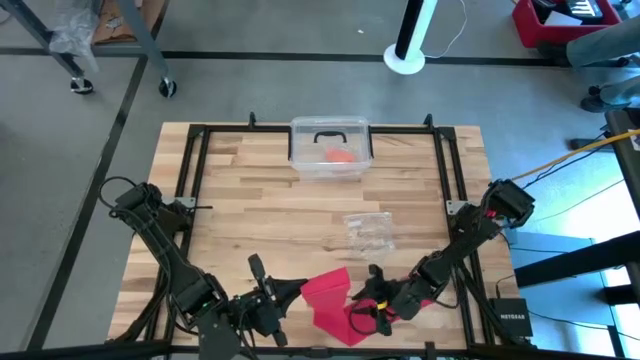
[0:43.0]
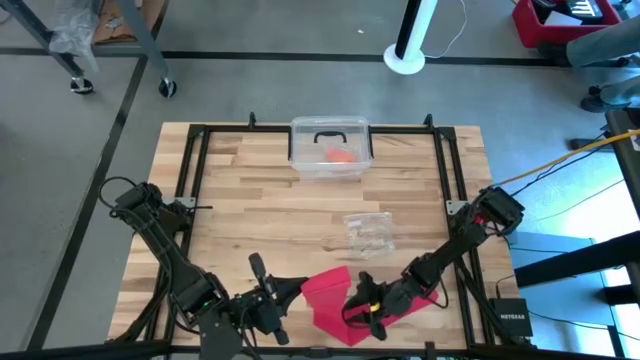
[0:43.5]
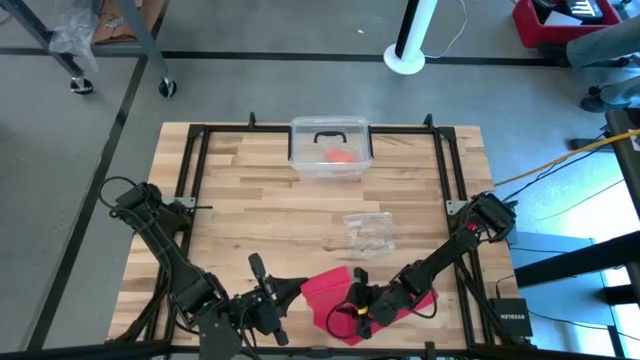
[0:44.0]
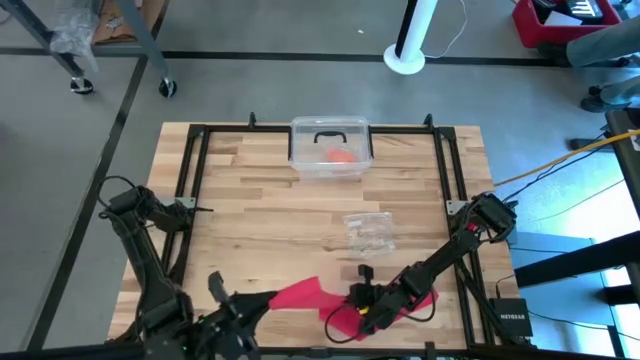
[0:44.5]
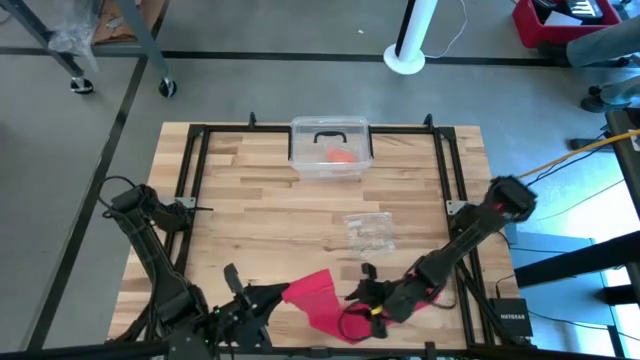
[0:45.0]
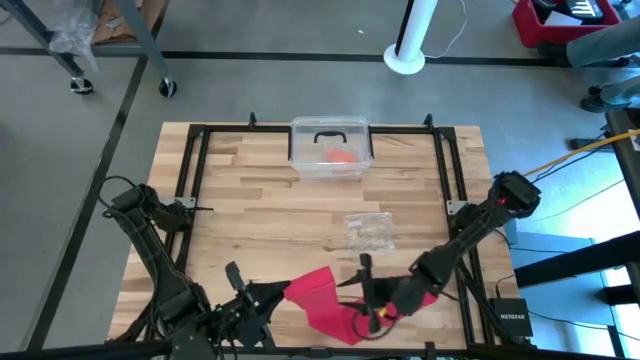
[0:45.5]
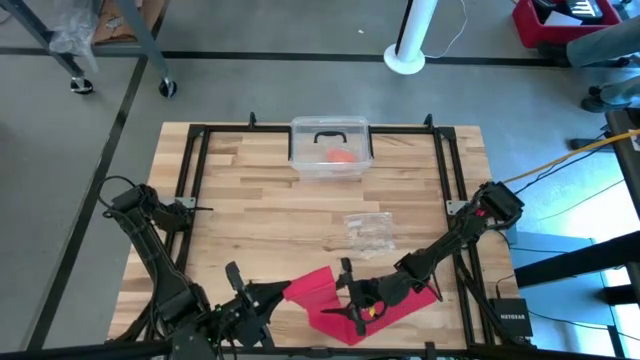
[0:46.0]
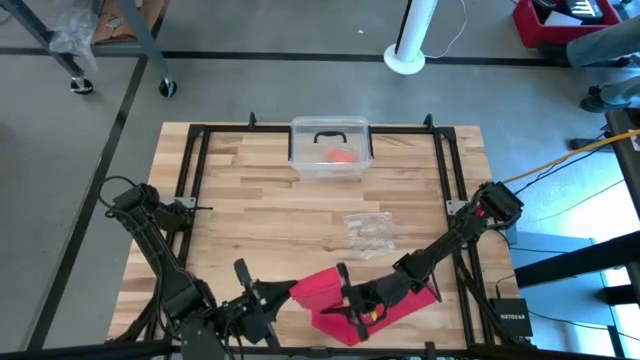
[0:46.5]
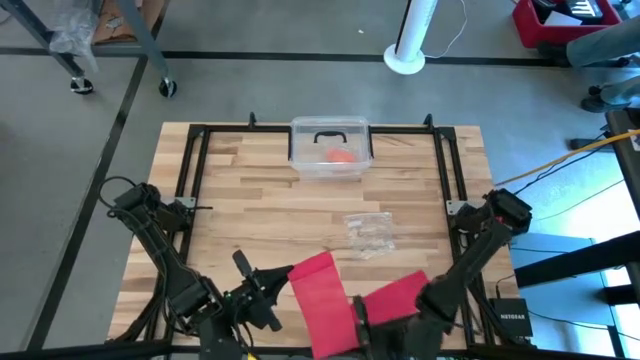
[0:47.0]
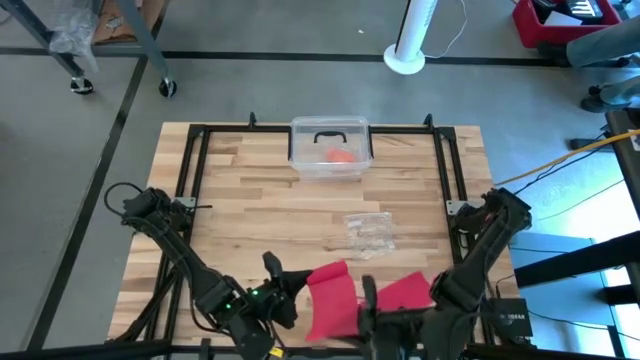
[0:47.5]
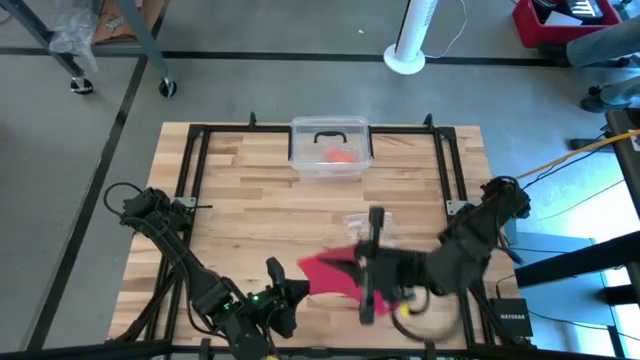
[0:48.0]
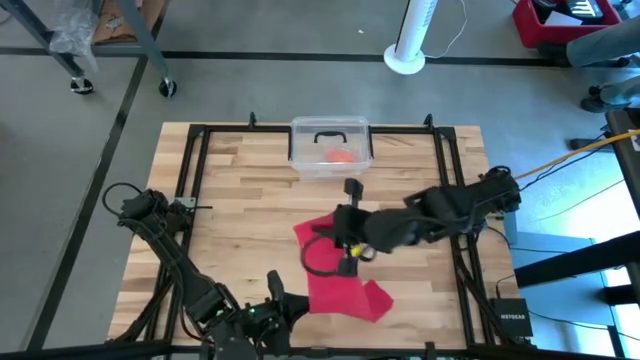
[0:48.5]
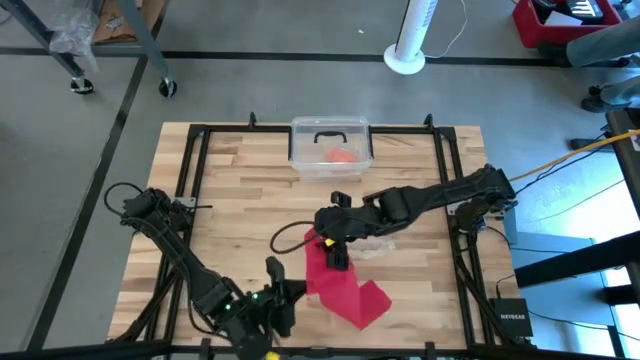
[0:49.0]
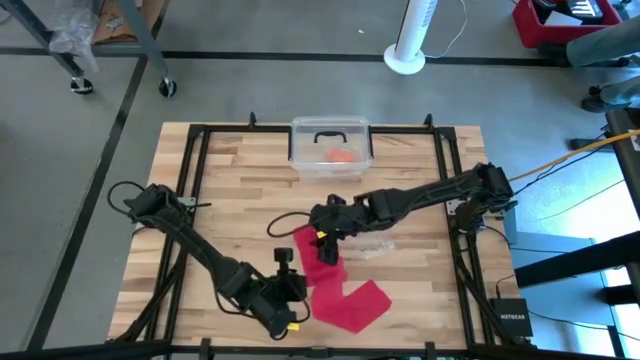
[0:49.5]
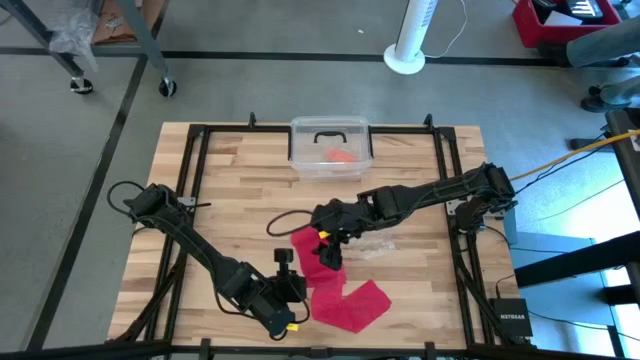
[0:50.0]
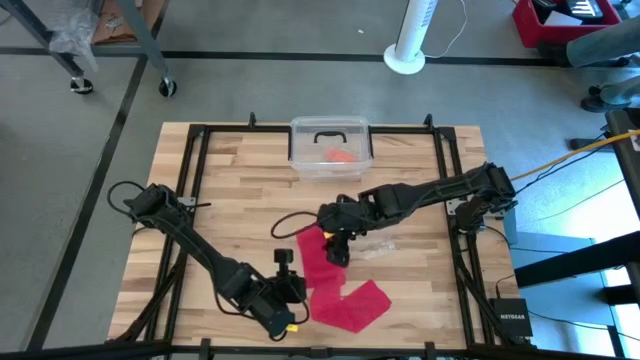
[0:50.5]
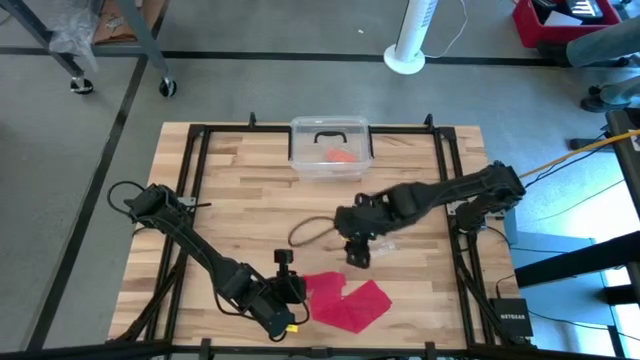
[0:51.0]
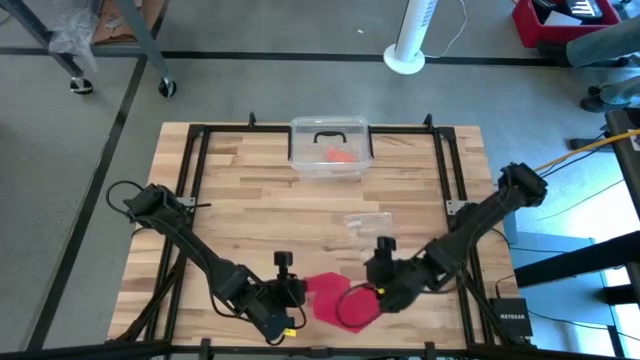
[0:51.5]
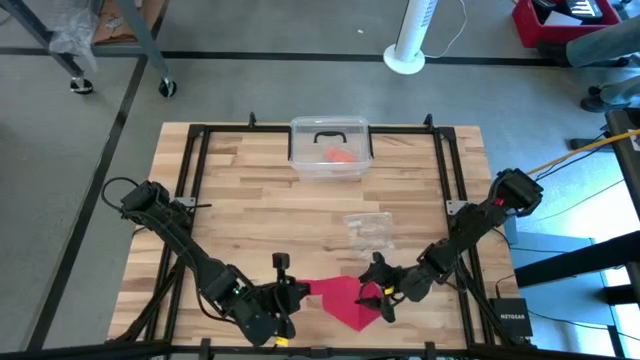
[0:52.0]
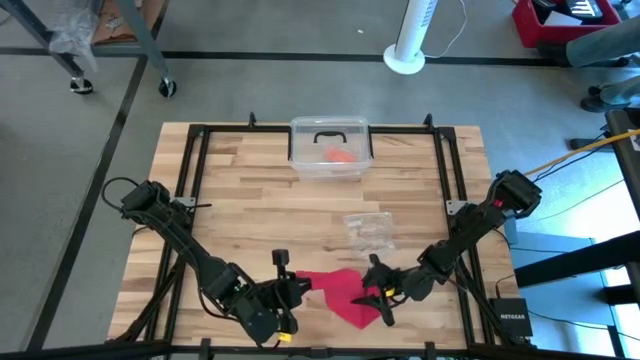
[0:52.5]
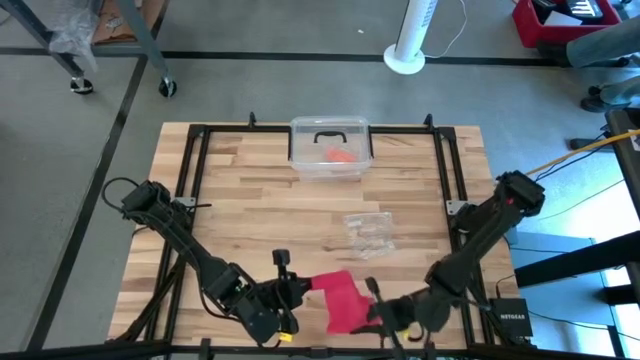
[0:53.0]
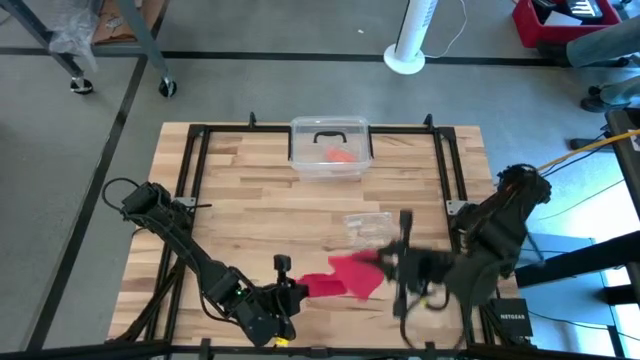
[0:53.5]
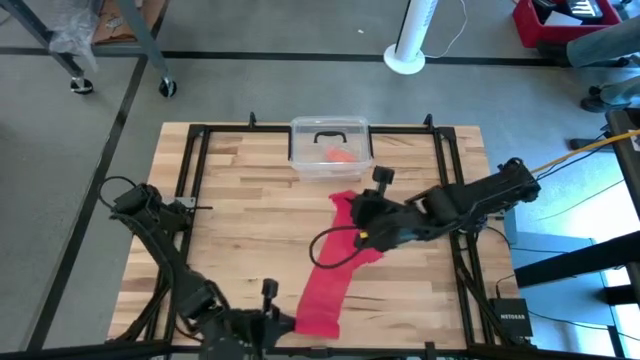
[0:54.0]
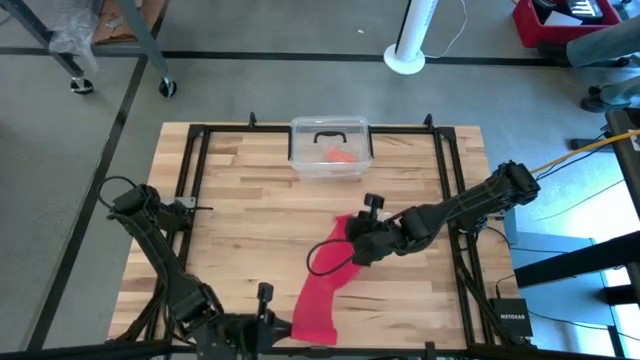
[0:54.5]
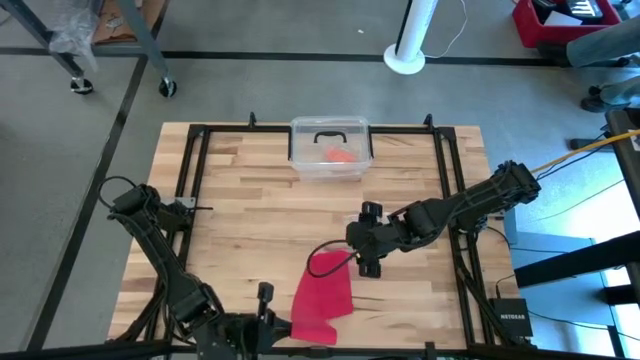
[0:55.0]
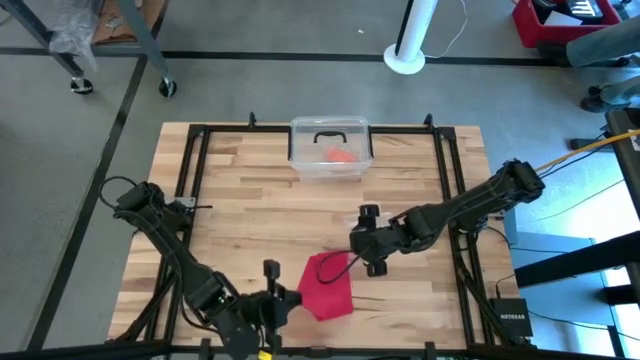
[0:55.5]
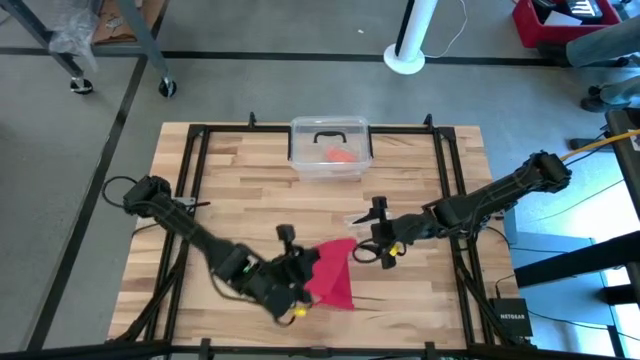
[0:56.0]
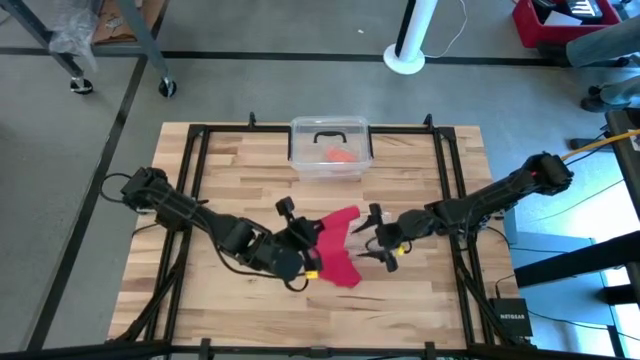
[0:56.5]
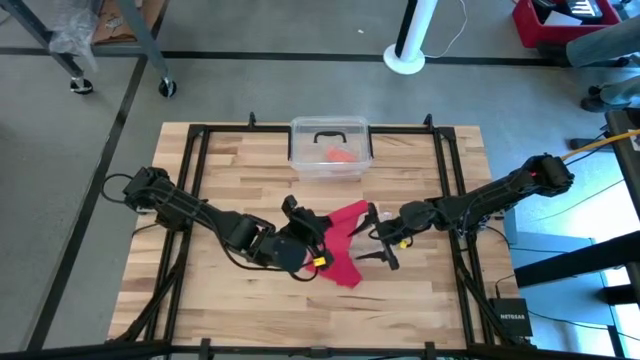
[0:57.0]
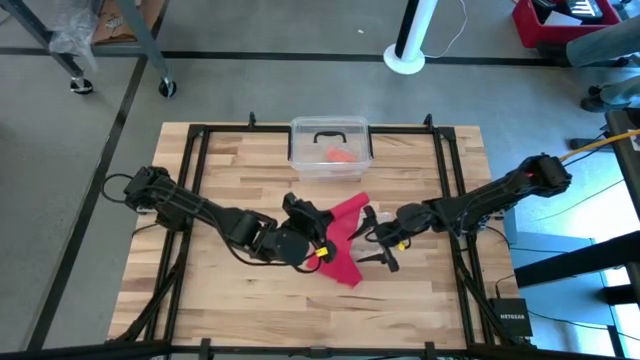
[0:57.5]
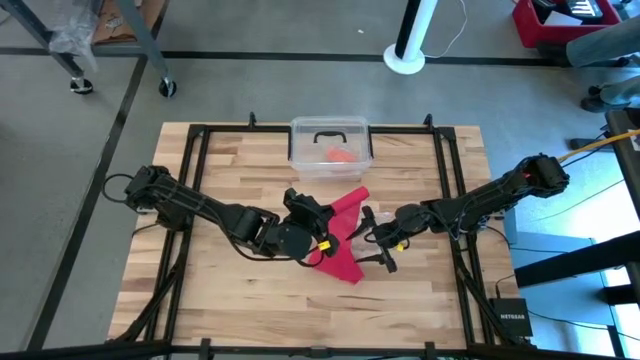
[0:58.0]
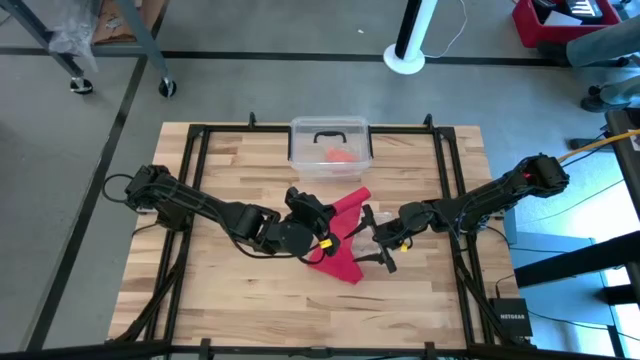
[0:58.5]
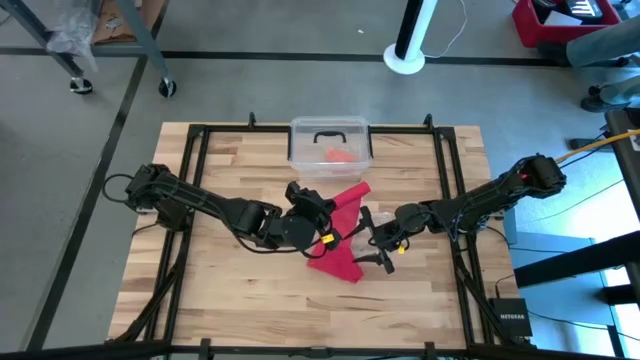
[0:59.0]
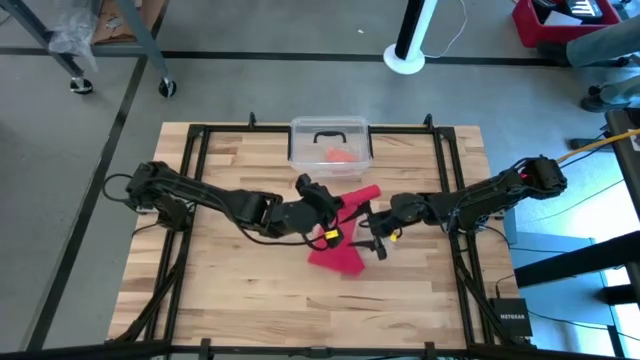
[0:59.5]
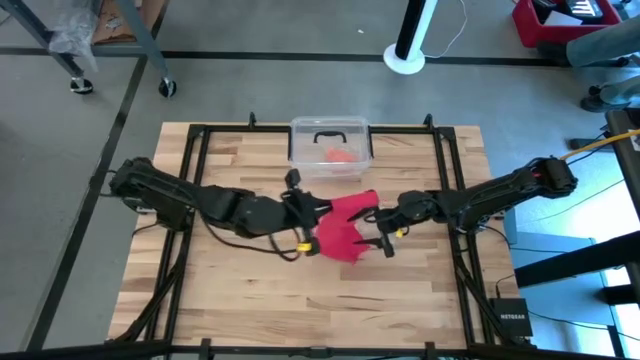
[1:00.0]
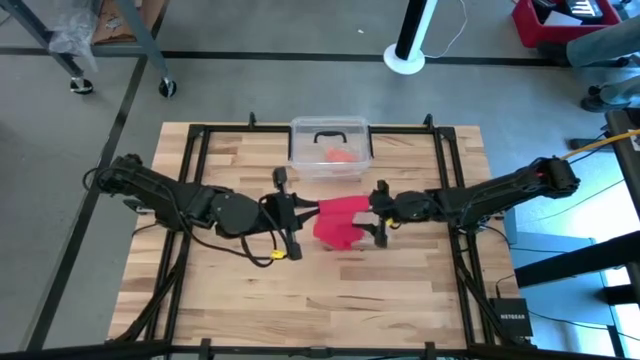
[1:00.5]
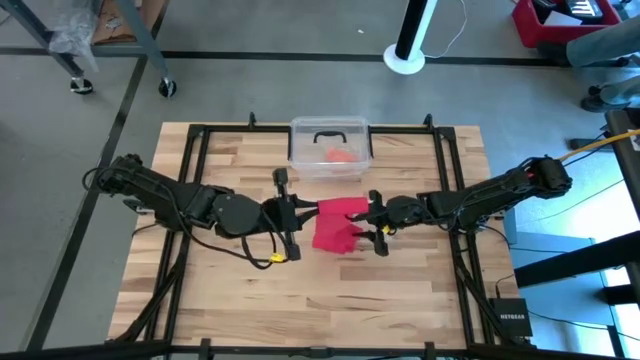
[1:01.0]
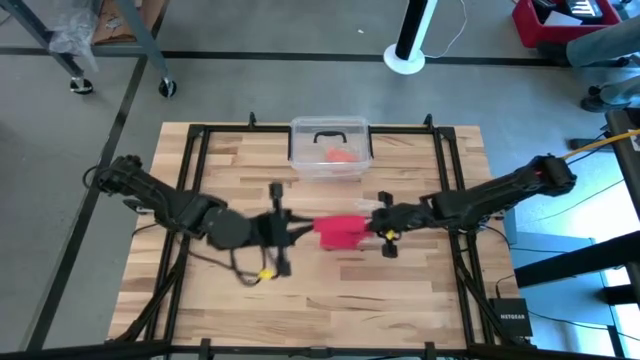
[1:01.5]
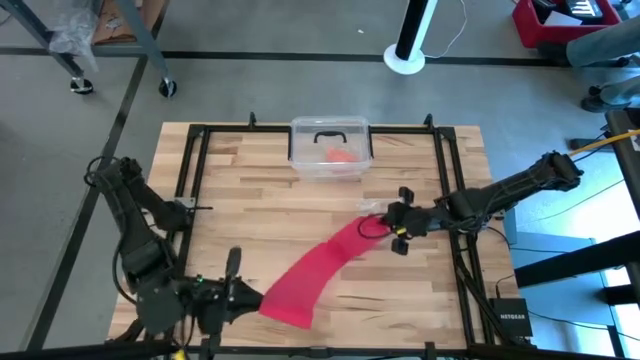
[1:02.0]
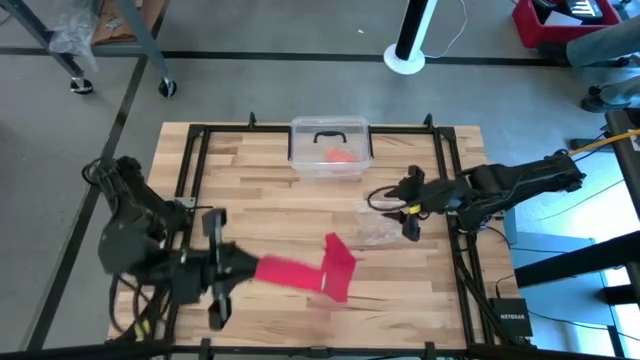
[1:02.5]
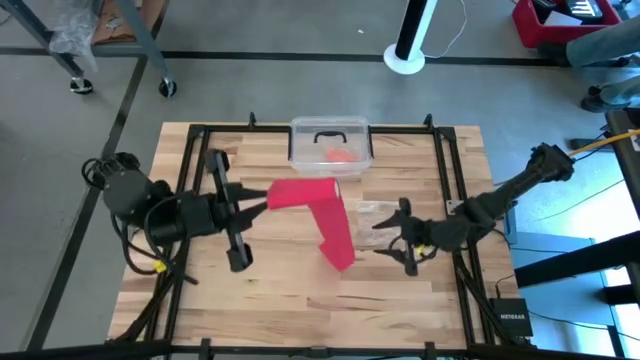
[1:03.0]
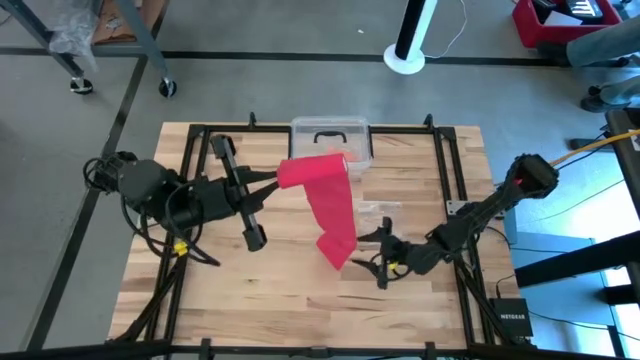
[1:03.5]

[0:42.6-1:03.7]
Task: Roll bandage
Roll the red bandage
